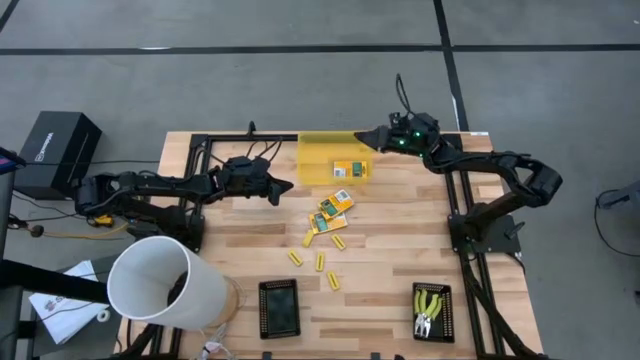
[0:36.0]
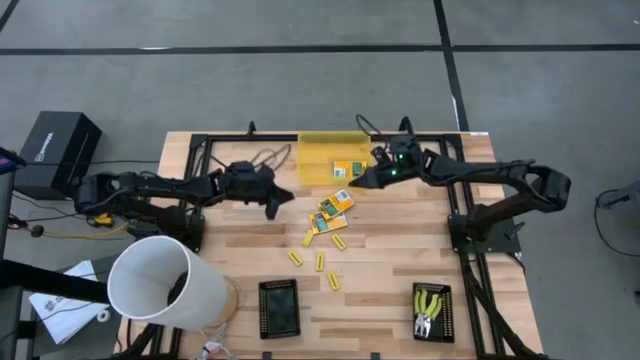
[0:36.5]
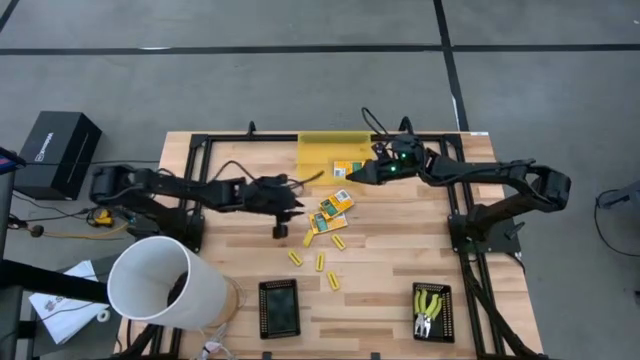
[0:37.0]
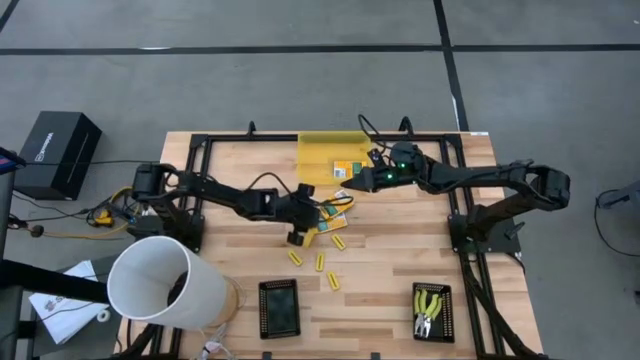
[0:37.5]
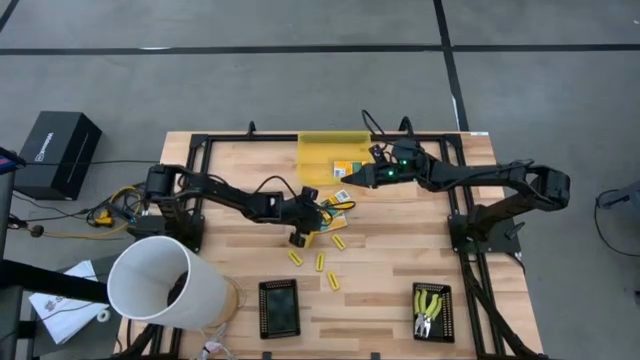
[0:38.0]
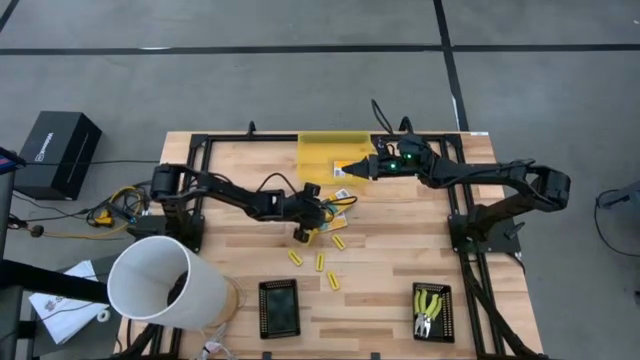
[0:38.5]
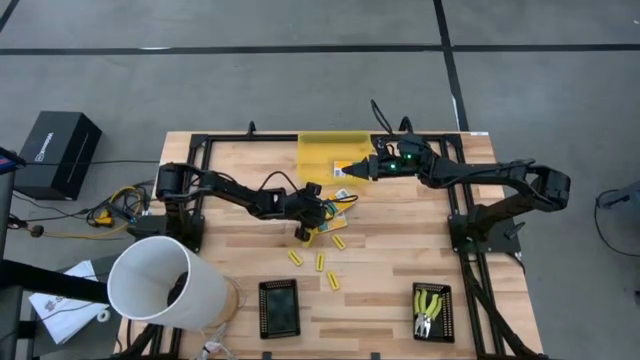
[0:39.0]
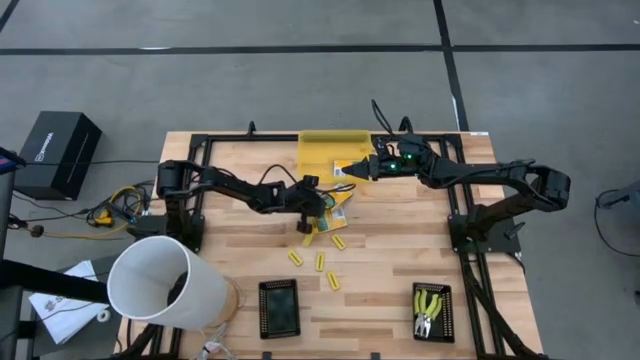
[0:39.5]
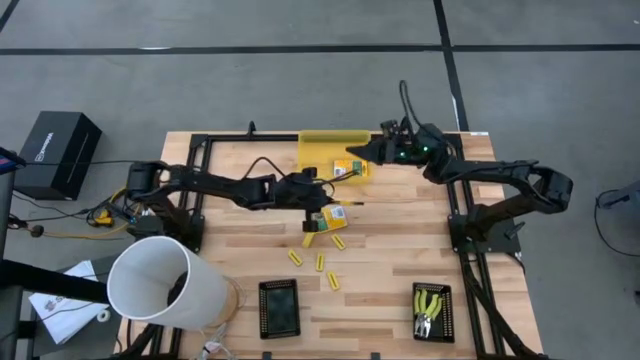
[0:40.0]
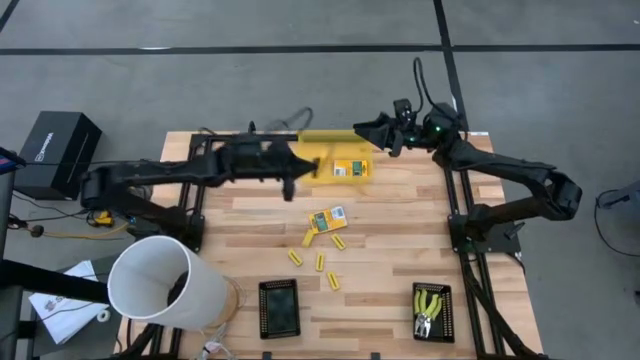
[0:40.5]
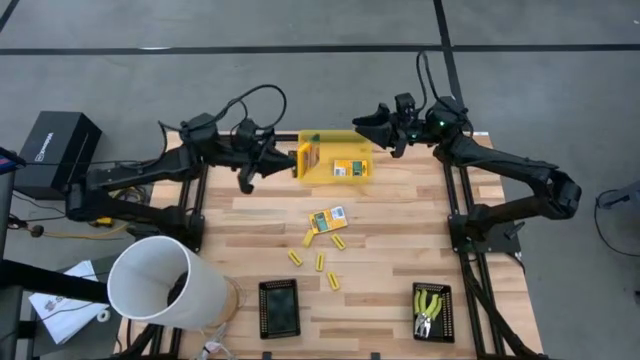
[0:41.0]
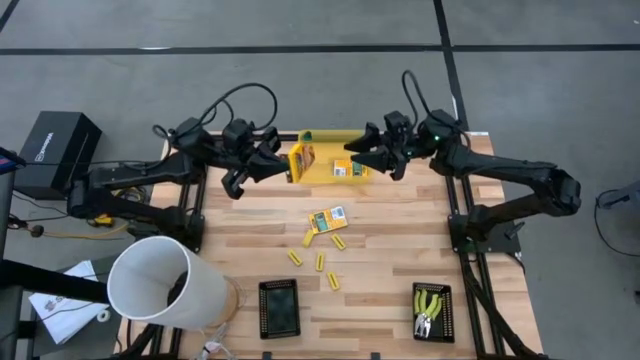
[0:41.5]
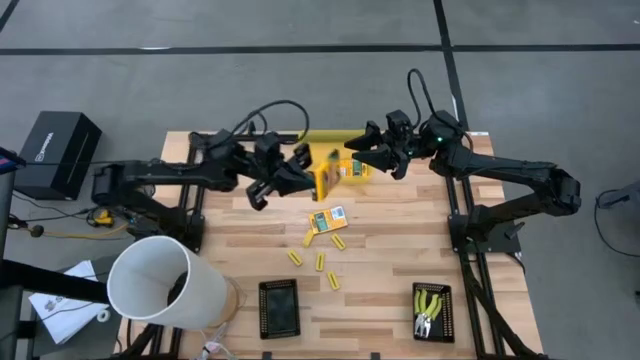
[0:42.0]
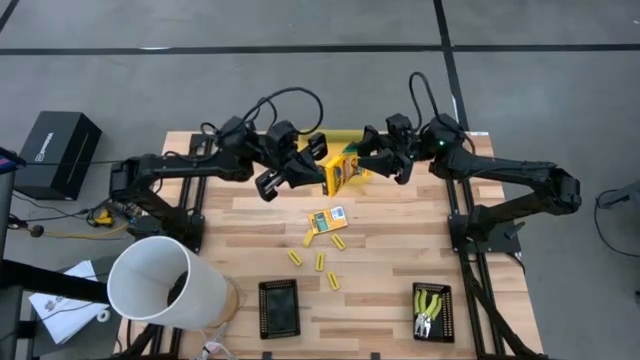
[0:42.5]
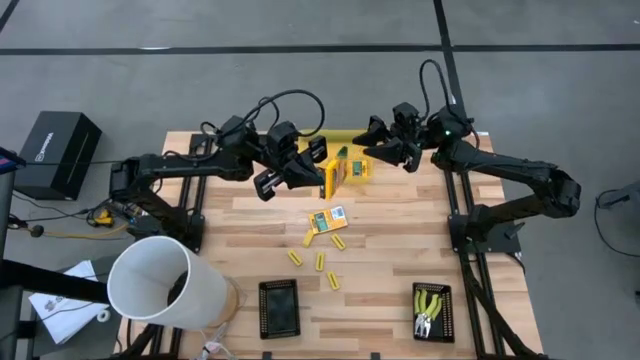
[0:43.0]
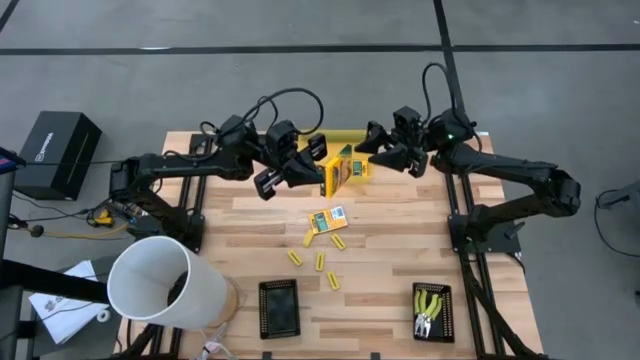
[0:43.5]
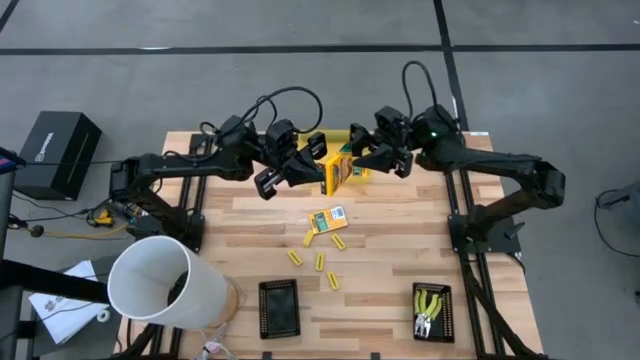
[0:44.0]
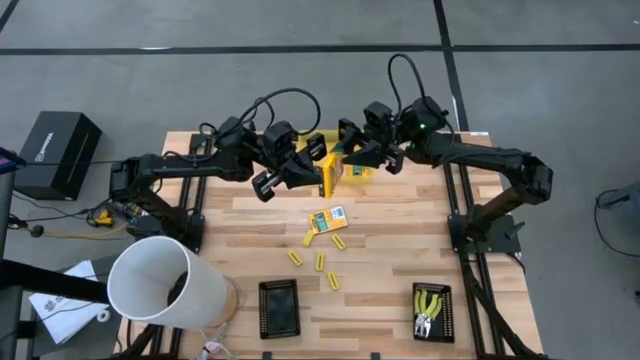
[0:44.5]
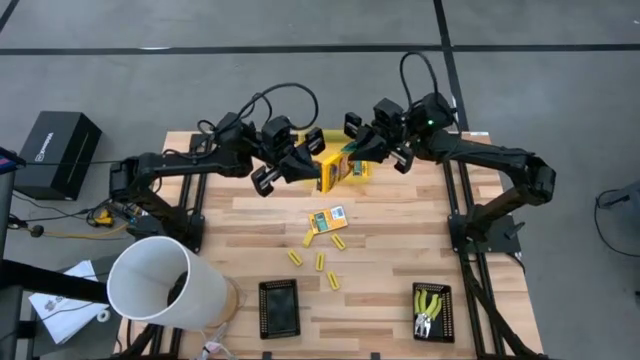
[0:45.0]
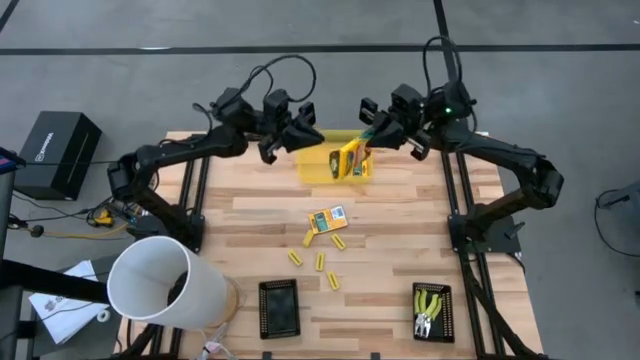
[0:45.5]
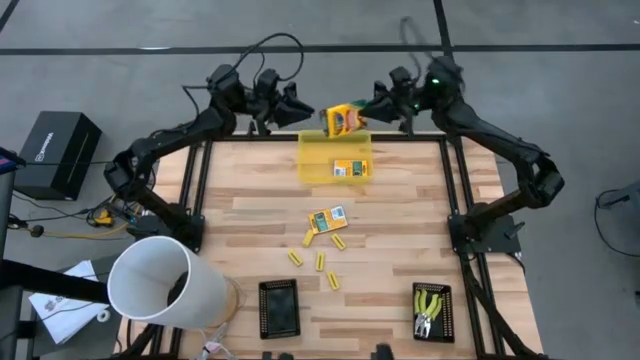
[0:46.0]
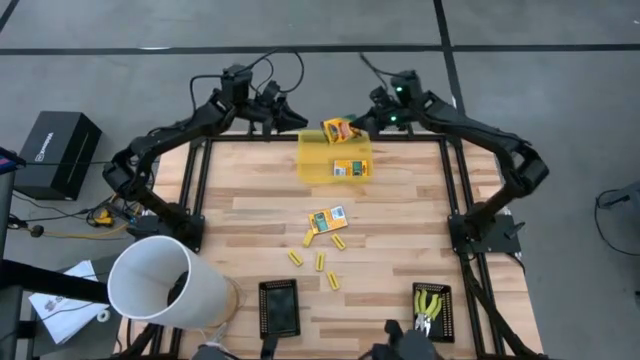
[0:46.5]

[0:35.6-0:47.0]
Task: Pick & Place School Supplies
Put the yellow crayon box into the yellow bin

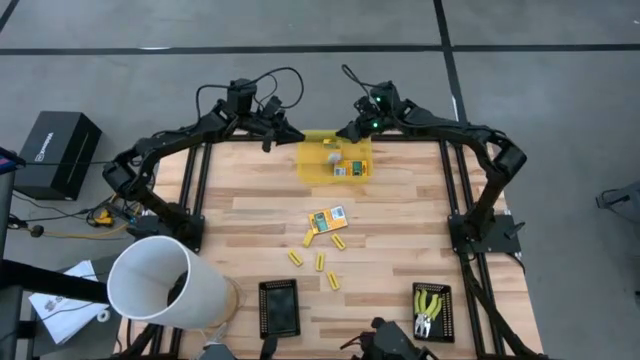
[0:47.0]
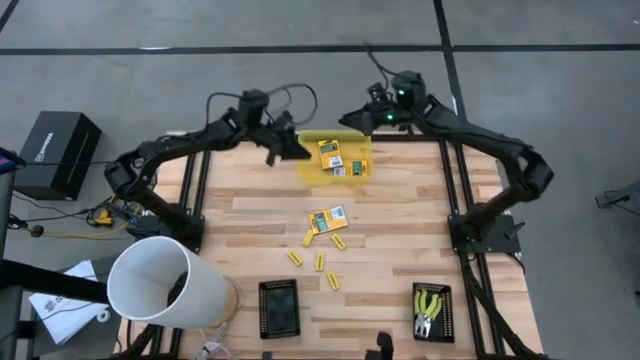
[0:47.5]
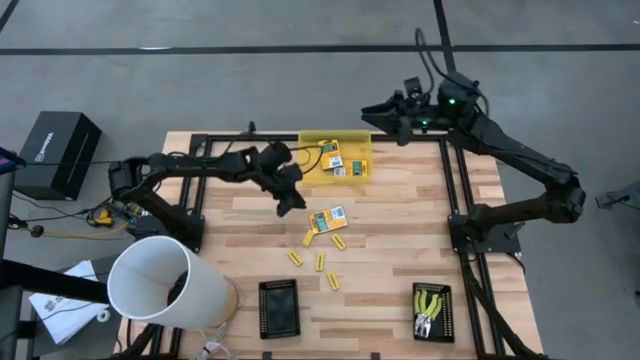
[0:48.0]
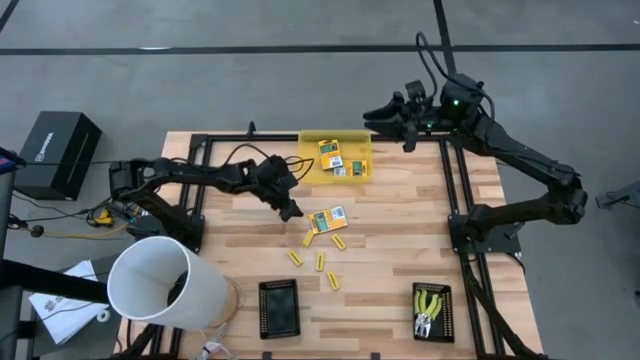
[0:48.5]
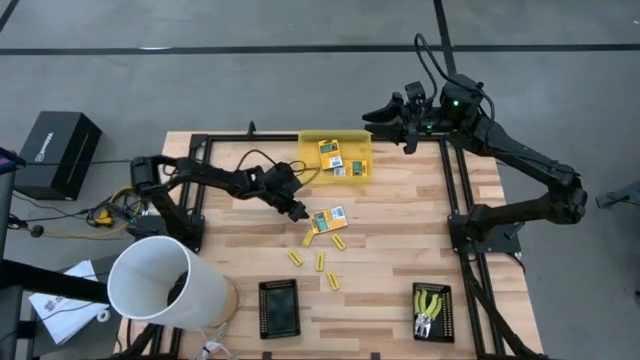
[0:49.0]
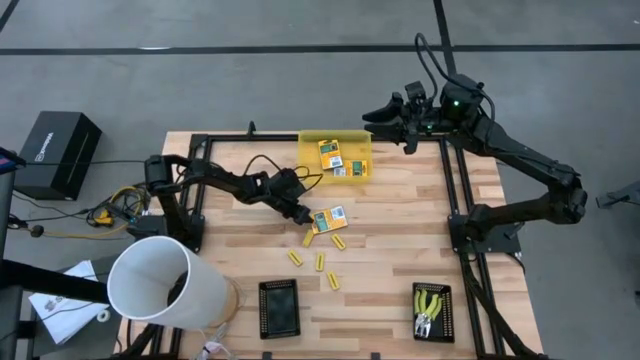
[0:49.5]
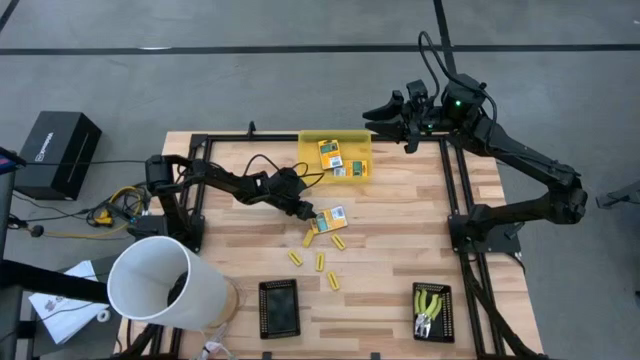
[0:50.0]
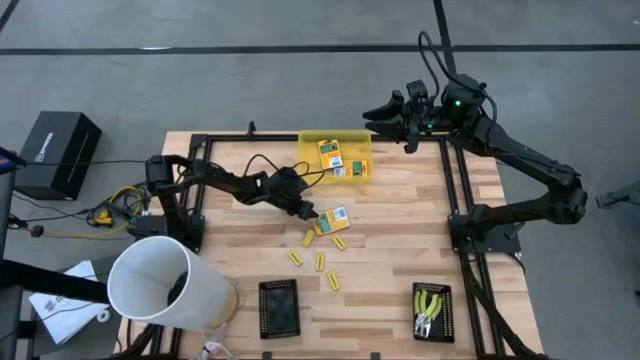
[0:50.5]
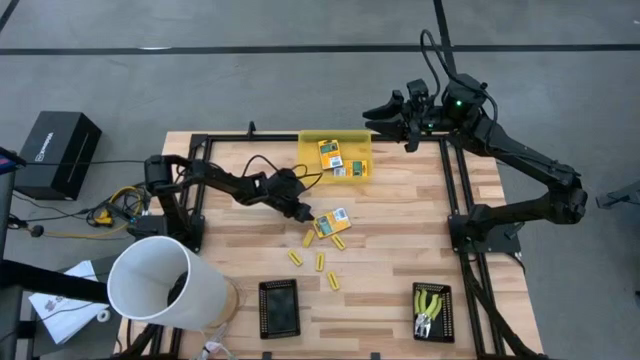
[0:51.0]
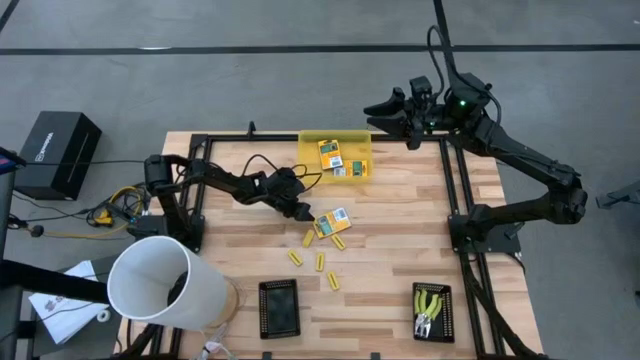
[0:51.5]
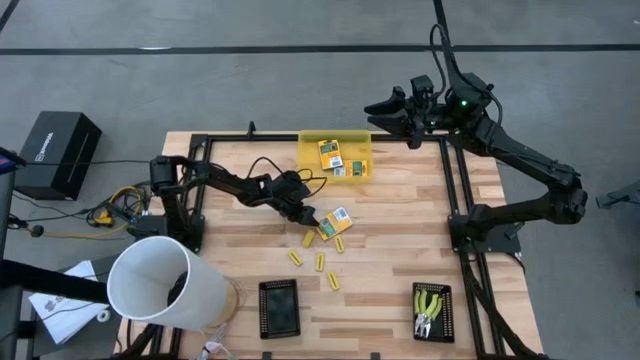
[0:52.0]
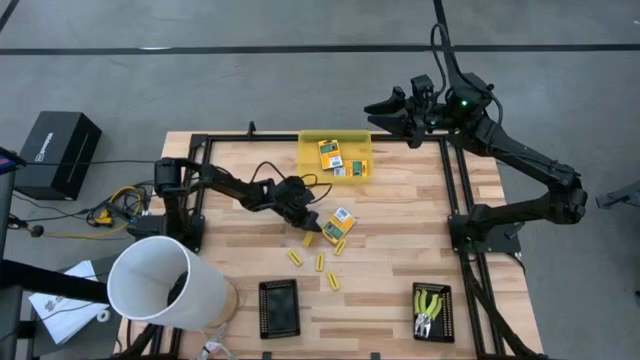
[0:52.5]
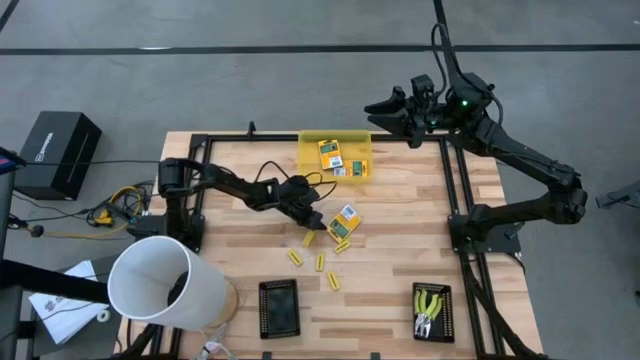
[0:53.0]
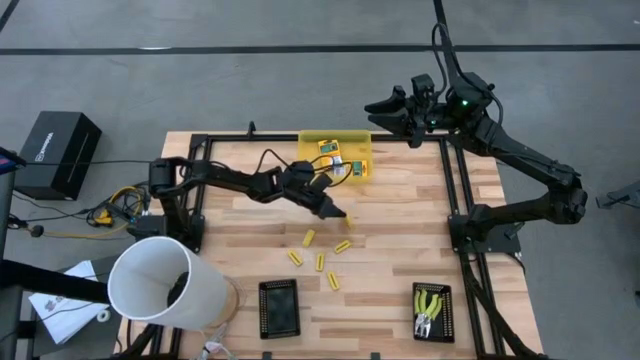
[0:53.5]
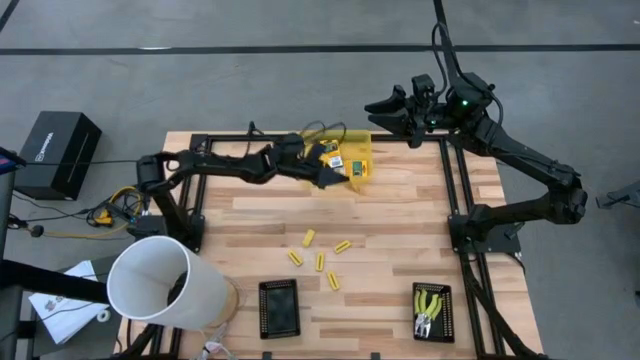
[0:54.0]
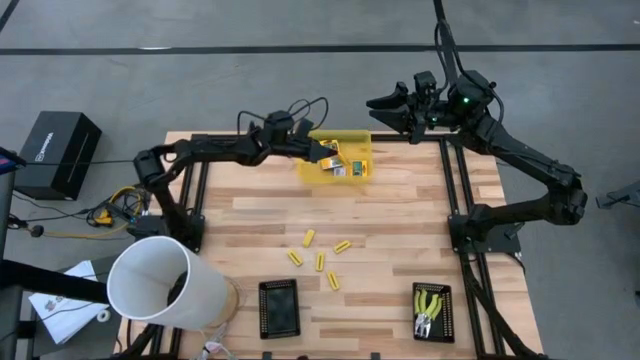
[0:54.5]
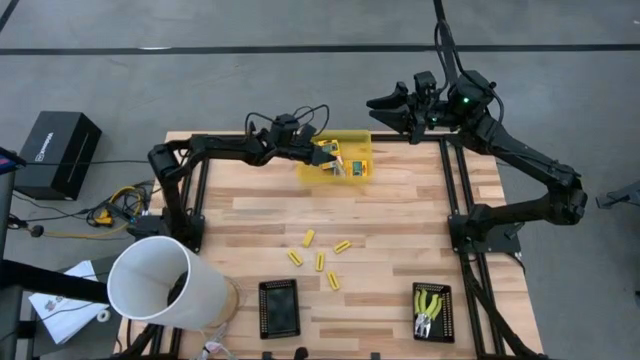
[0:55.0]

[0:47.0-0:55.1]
Put the yellow crayon box into the yellow bin

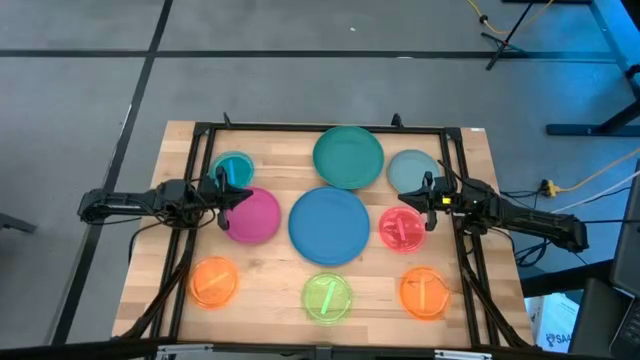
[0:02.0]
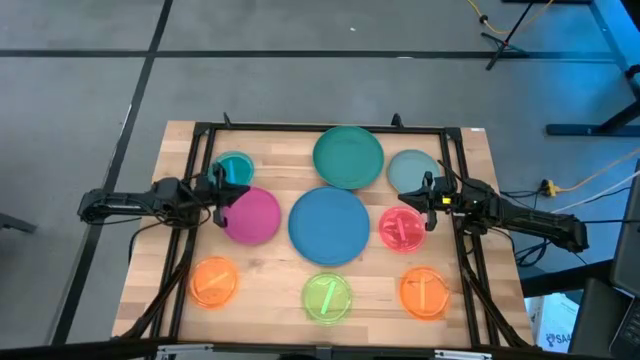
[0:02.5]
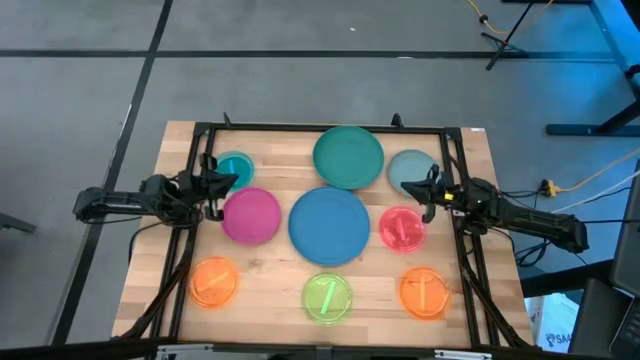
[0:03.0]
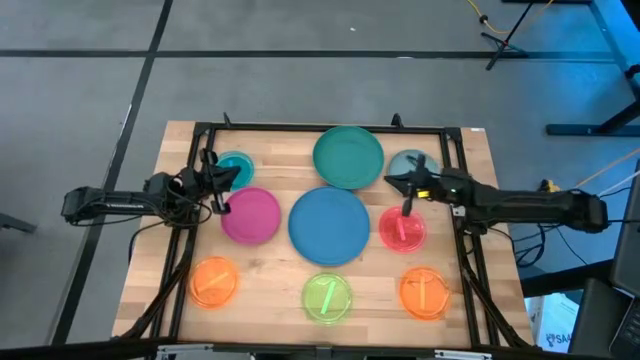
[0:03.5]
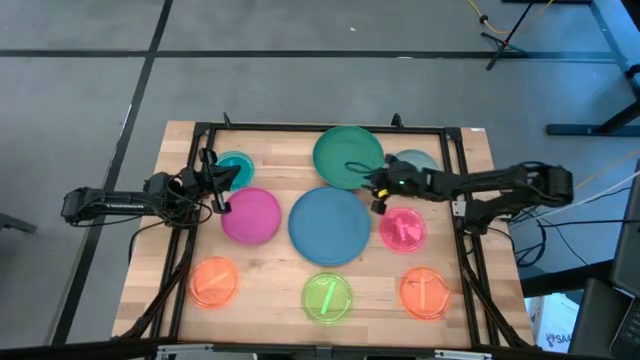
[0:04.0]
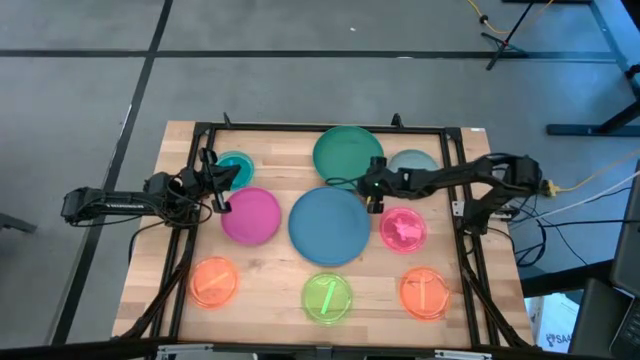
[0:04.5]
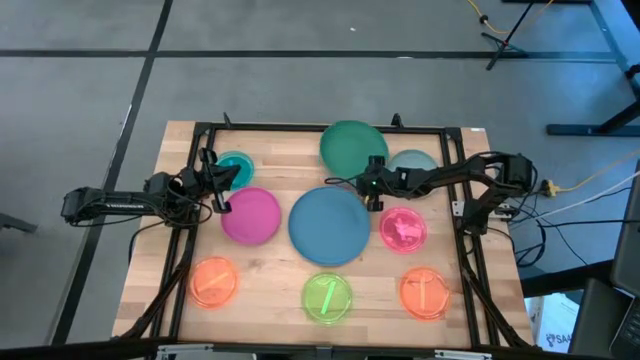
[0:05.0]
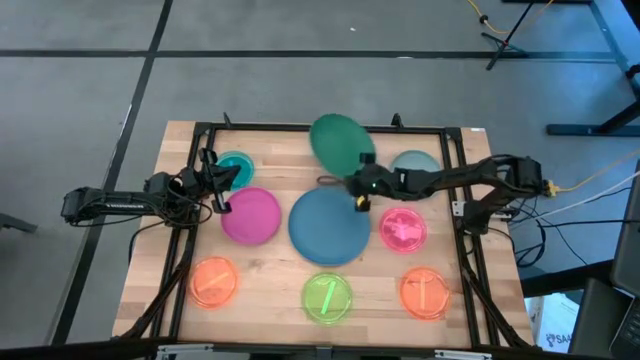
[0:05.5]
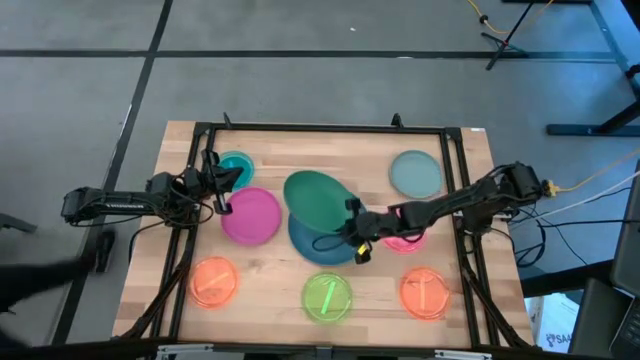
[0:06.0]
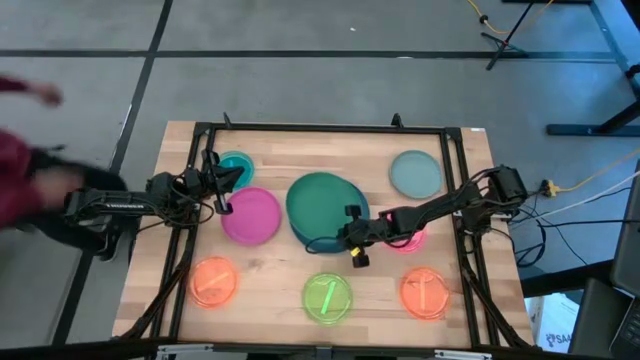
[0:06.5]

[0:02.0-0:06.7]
Task: Stack plastic plates
Stack the green plate on top of the blue plate
